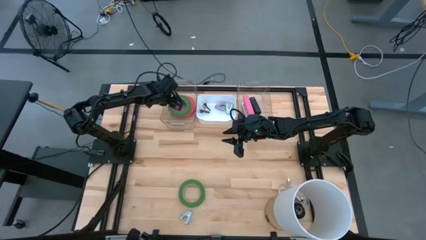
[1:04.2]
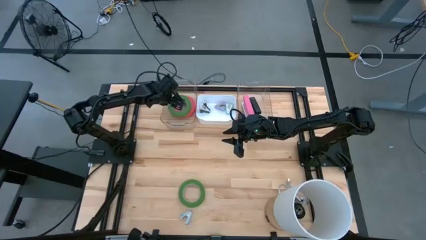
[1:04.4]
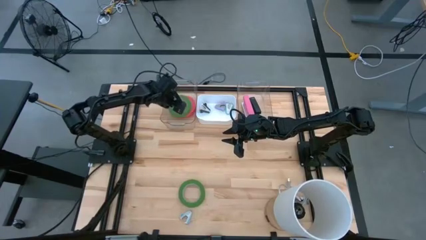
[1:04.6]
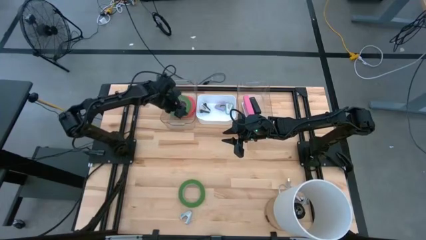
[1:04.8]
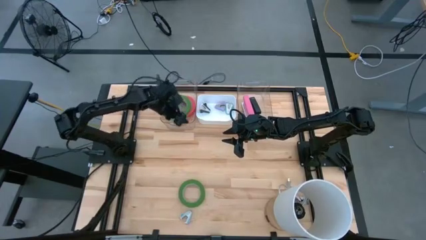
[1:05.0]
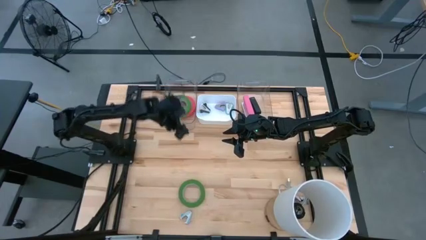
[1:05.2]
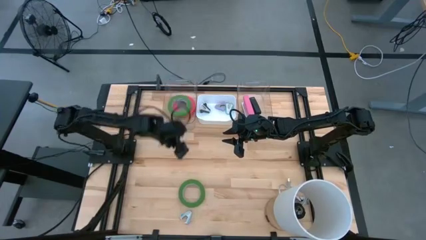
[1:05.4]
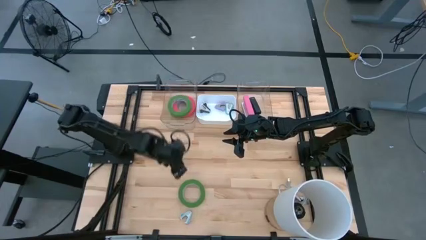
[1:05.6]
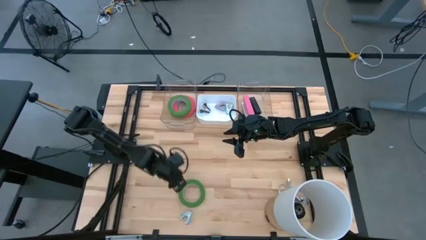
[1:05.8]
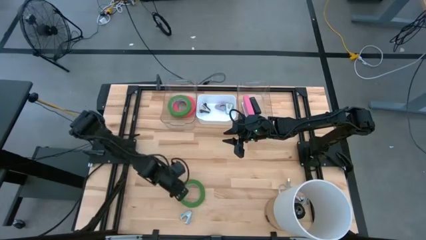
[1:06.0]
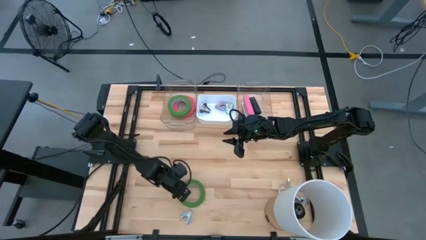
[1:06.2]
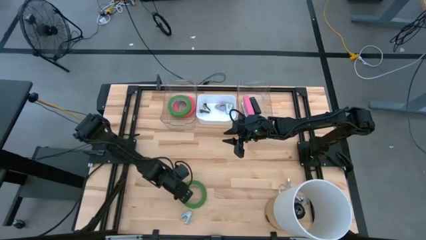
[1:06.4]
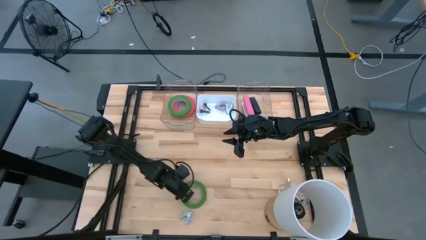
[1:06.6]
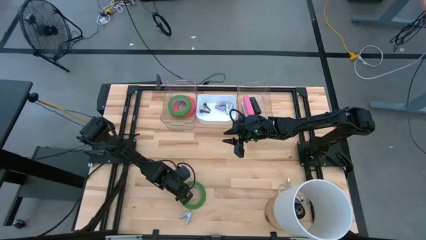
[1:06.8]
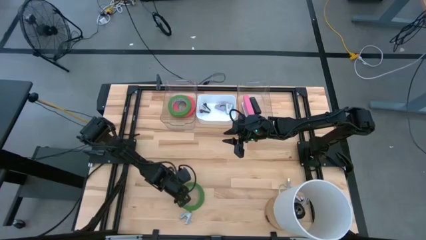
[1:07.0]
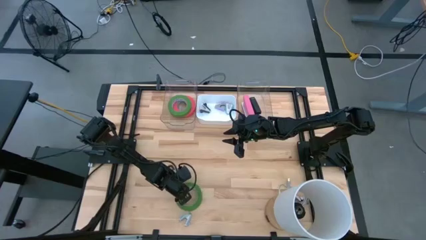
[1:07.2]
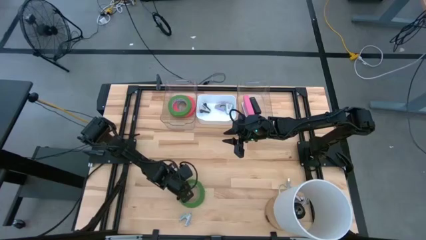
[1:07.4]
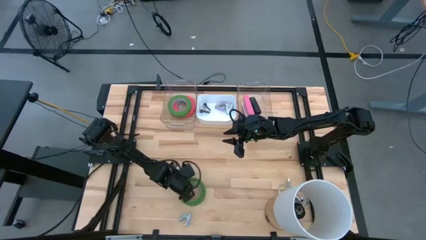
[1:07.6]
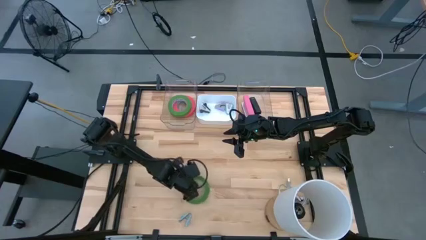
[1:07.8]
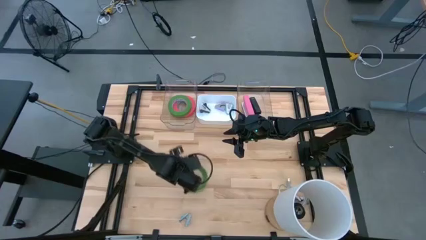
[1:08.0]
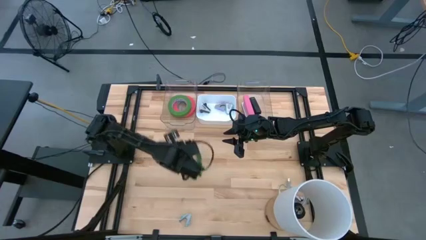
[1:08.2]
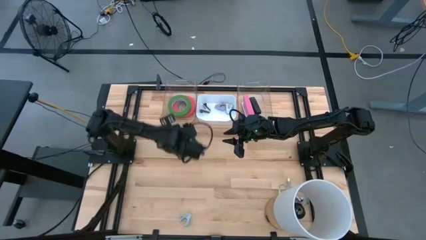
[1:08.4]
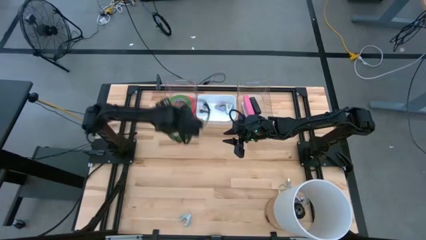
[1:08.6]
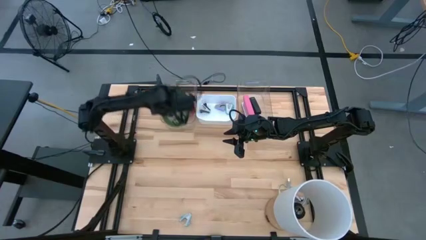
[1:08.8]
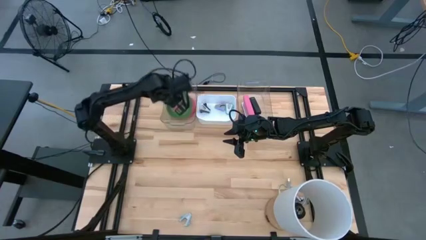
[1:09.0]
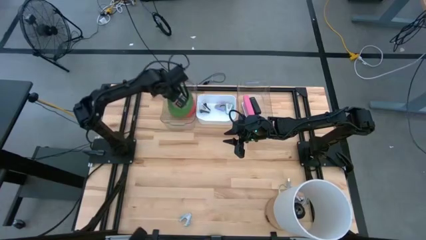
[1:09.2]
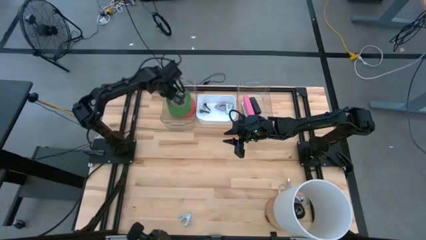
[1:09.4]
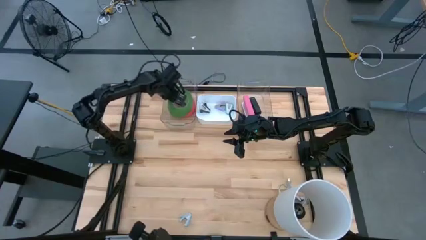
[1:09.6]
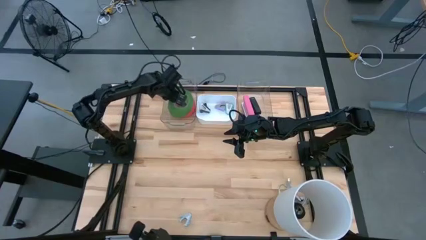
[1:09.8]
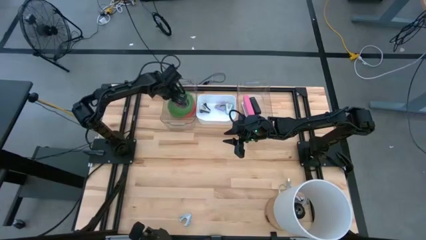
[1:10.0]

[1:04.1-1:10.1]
Task: Pick and place Stapler, Stapler remover, tape
Put the light green masking tape into the left transparent bin

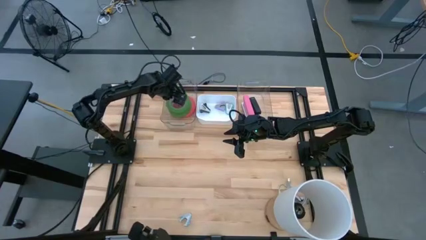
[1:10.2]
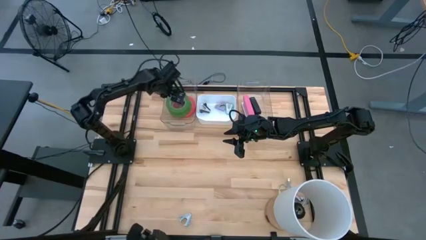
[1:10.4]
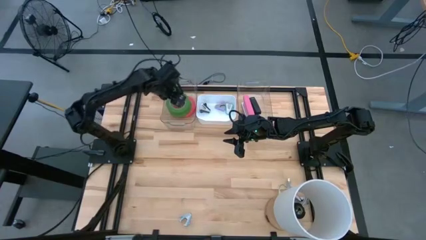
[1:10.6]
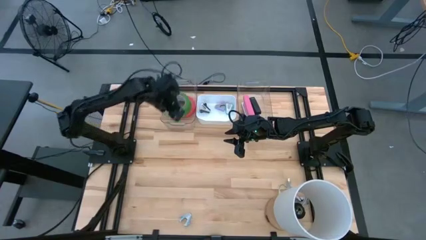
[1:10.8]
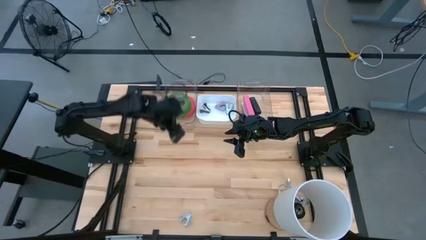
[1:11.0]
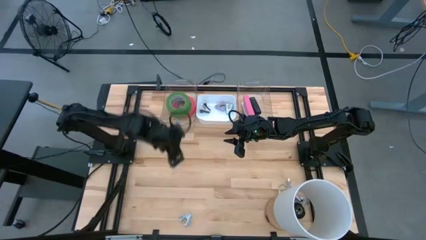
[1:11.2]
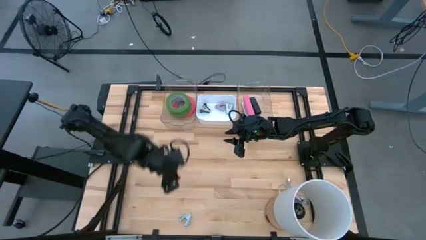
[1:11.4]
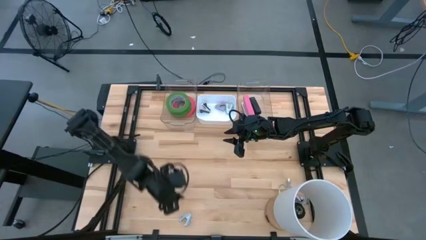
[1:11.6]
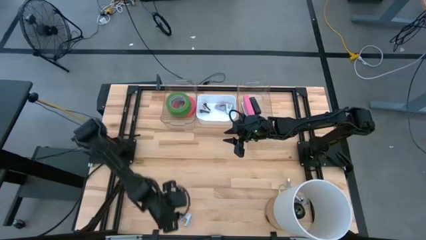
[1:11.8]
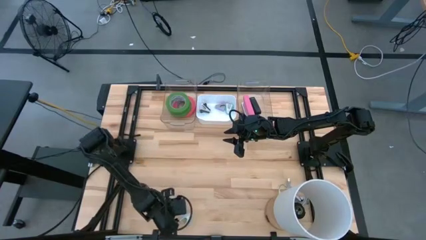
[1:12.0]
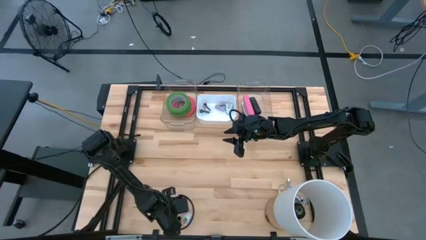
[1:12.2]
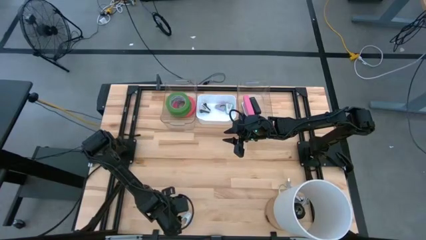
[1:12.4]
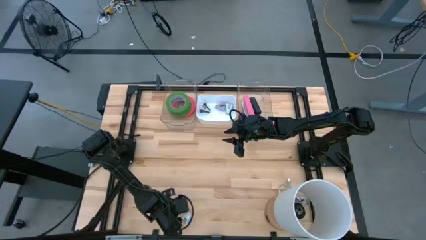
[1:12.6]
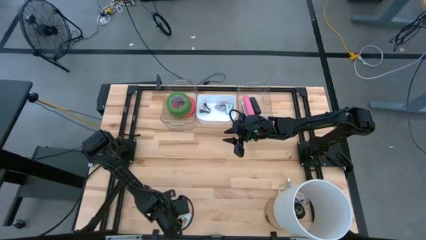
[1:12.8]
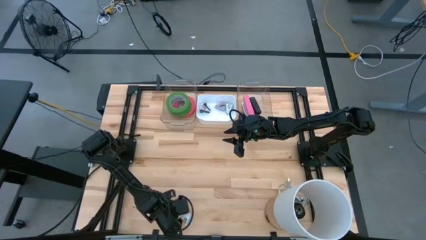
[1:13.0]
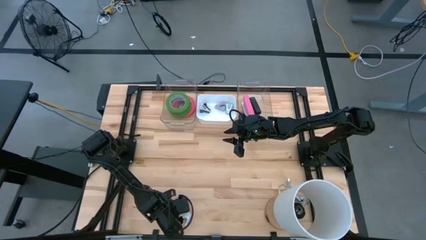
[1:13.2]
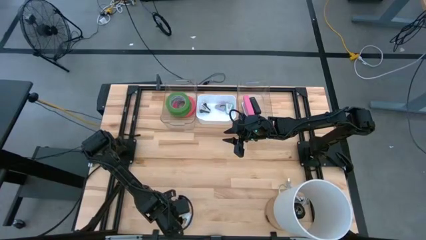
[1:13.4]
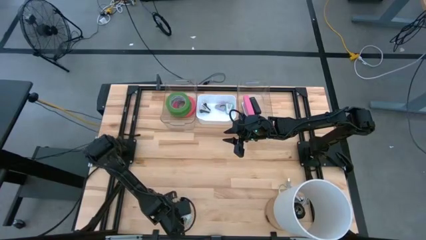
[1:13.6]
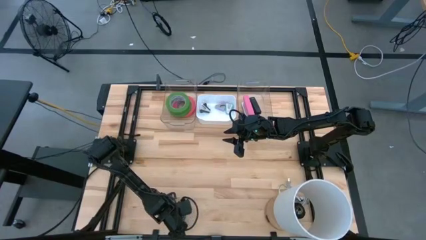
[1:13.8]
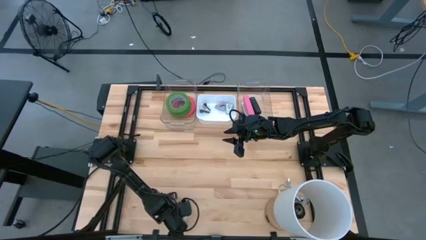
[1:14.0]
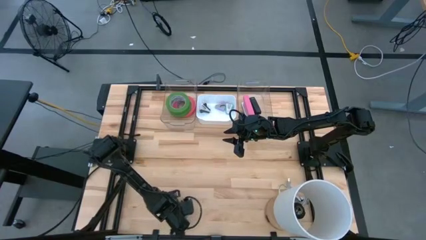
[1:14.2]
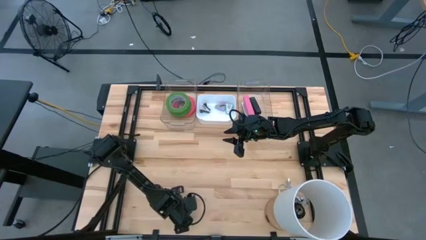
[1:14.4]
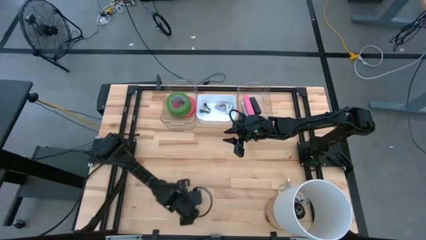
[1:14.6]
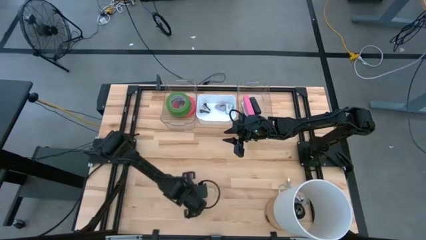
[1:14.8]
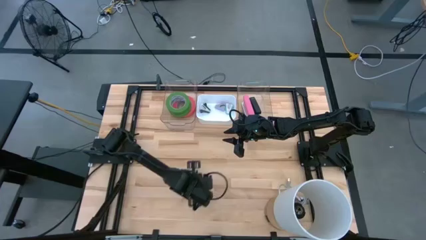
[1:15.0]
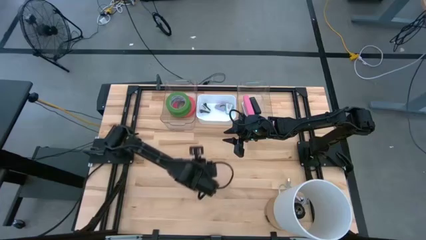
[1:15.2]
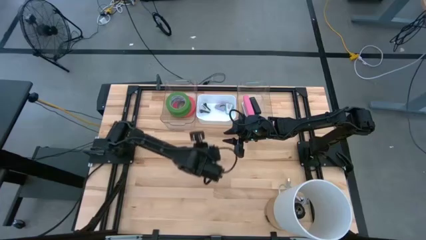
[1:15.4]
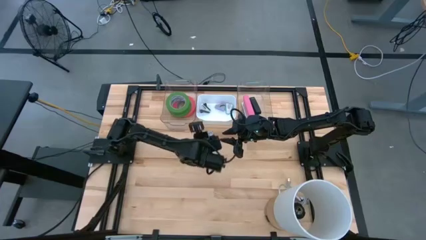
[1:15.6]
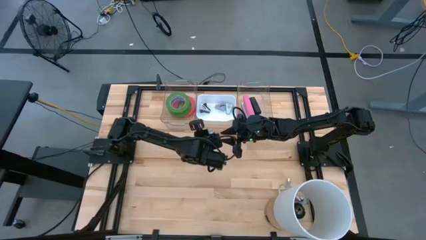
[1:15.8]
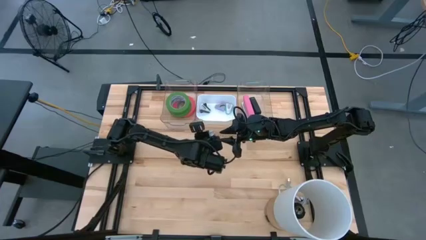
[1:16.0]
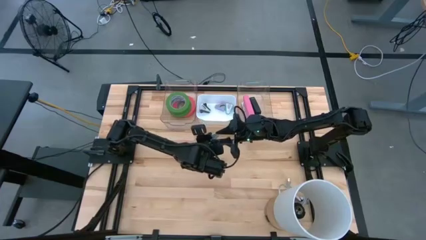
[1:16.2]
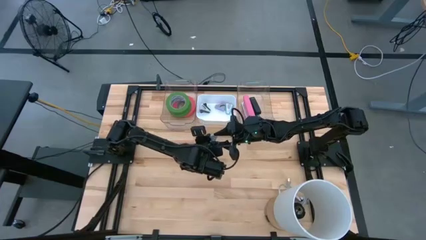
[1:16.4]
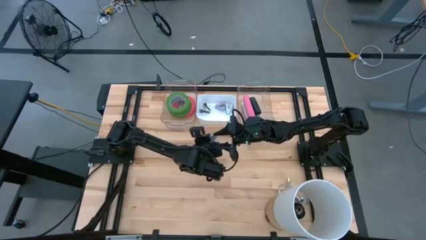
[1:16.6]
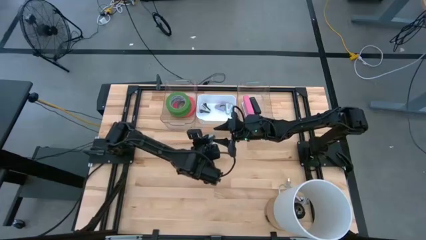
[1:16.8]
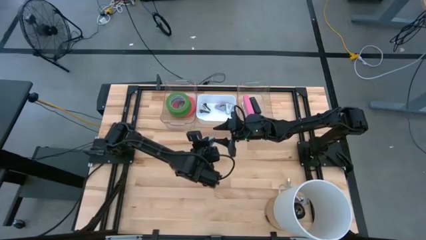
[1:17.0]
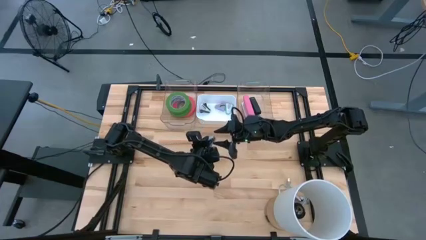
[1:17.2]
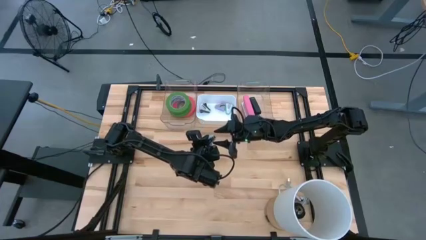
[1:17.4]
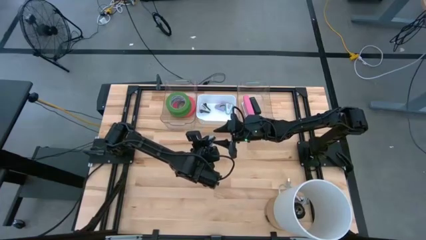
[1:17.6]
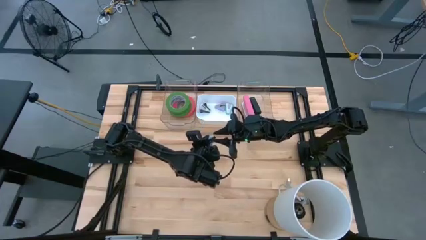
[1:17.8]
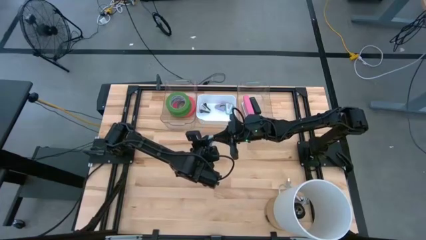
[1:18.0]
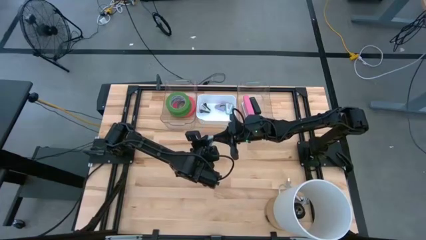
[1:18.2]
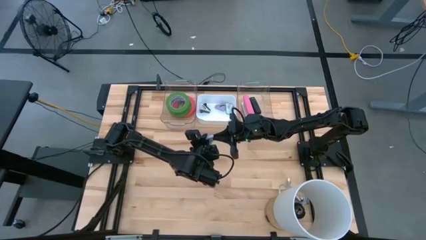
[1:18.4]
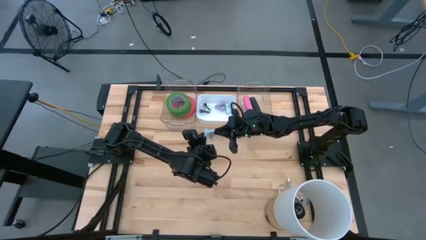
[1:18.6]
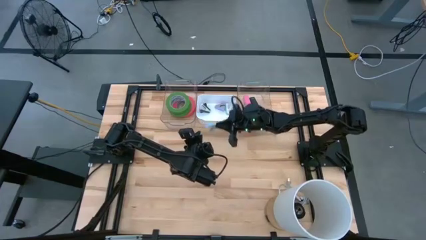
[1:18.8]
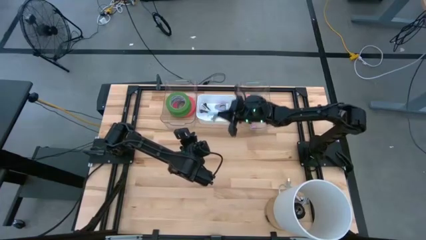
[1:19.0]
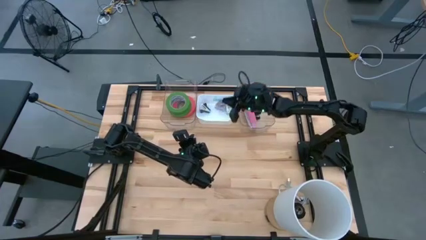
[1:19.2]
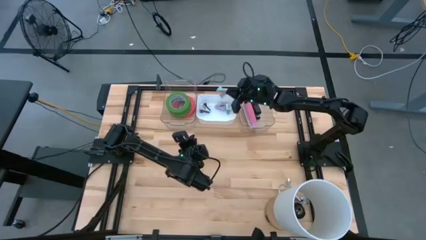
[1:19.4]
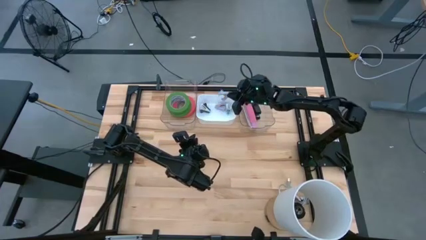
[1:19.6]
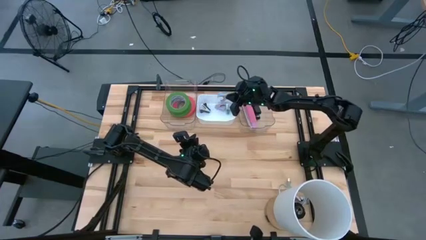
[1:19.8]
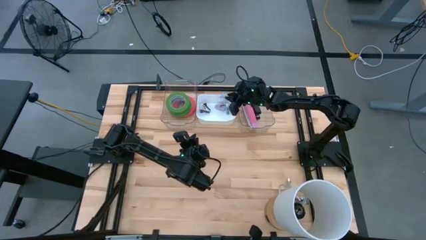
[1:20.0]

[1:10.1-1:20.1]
Put the blue staple remover into the white bin

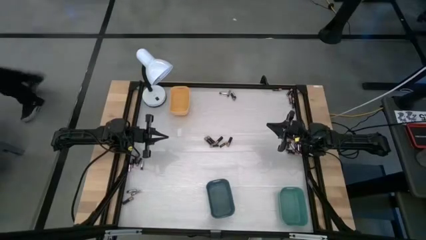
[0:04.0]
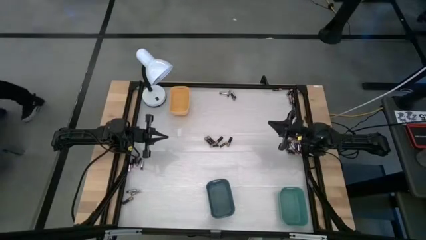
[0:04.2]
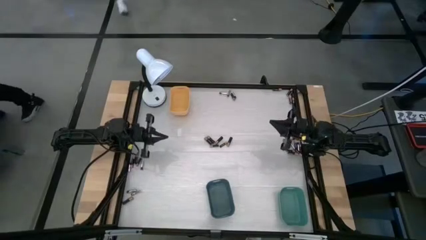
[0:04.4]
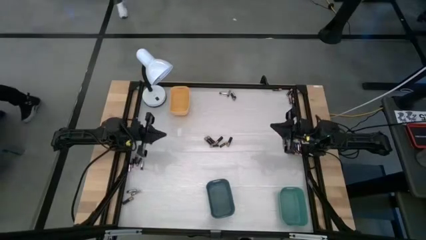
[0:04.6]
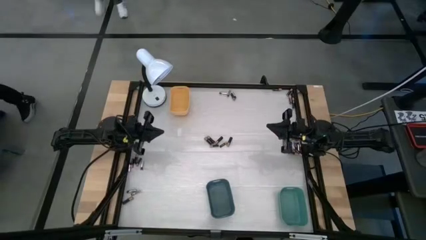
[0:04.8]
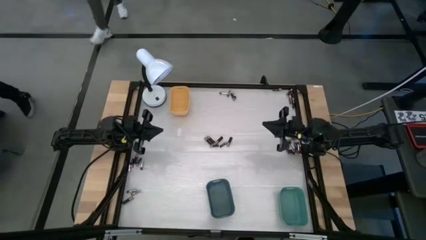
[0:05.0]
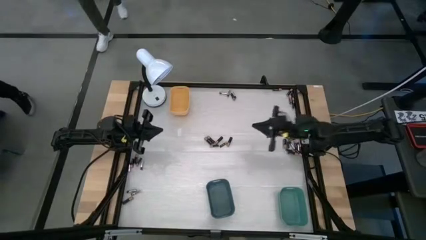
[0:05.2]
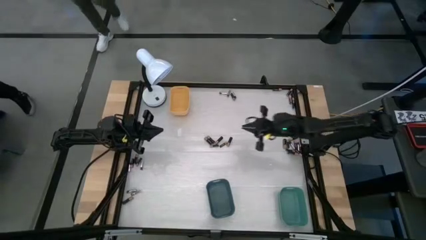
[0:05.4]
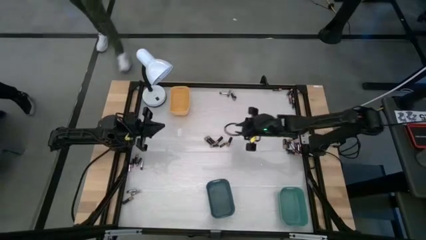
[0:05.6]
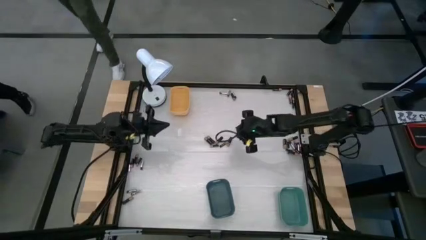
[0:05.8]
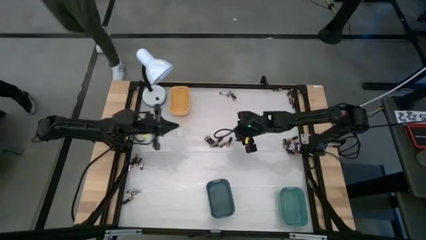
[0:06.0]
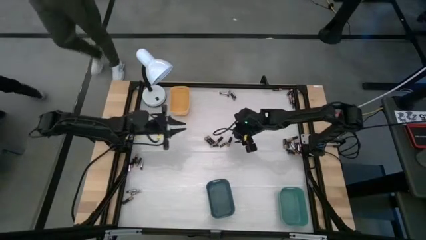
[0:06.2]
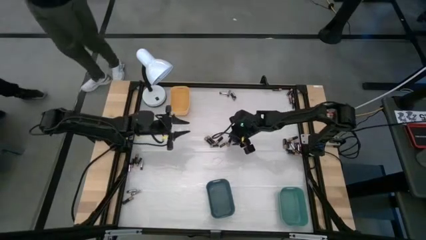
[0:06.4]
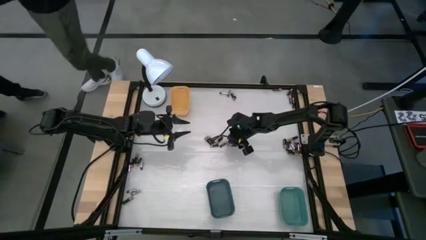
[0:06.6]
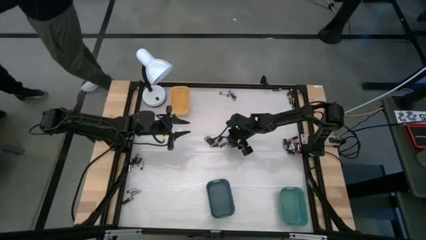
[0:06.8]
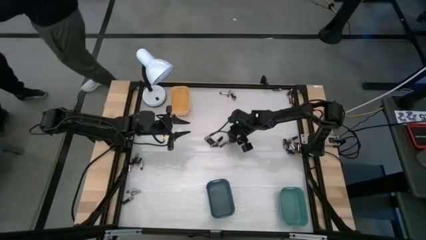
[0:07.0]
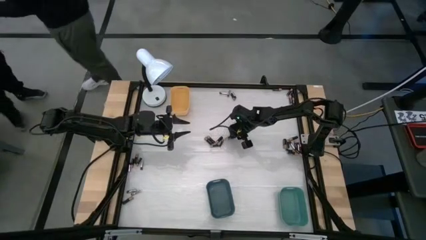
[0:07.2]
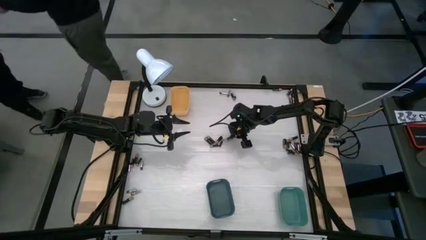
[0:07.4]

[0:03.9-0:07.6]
Task: Sort batteries
Put the black battery into the blue bin
